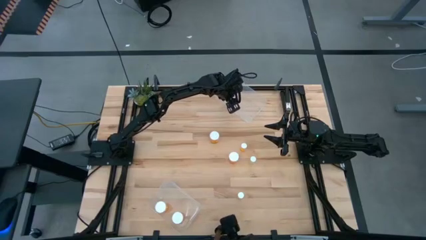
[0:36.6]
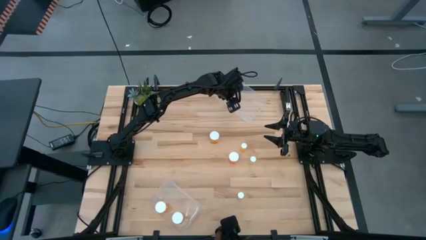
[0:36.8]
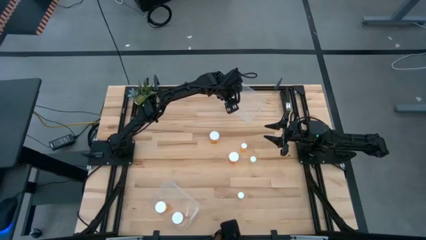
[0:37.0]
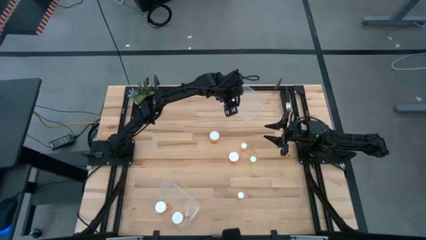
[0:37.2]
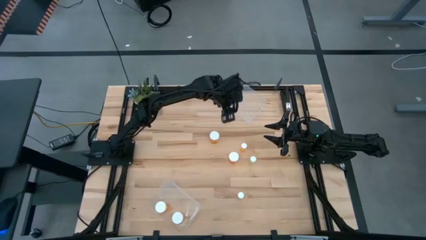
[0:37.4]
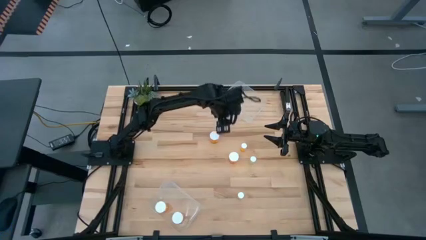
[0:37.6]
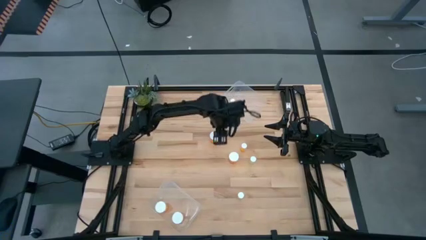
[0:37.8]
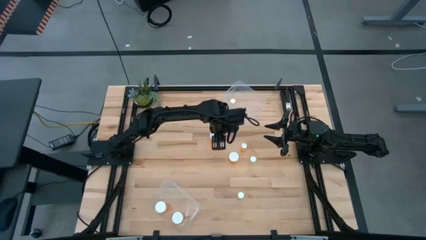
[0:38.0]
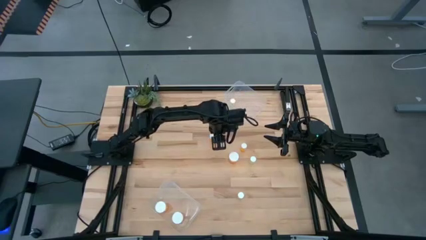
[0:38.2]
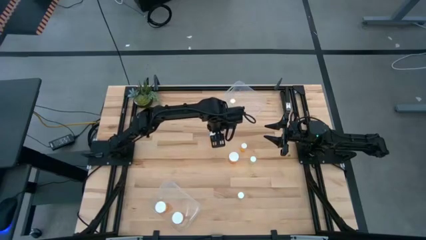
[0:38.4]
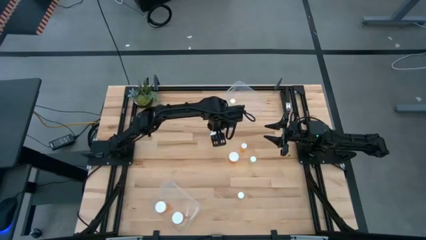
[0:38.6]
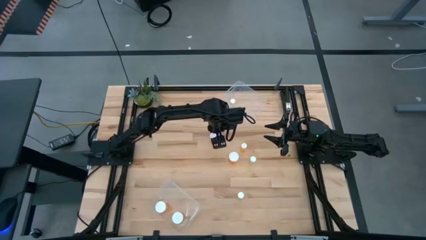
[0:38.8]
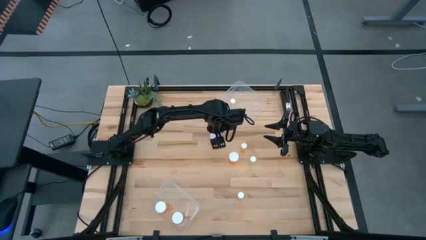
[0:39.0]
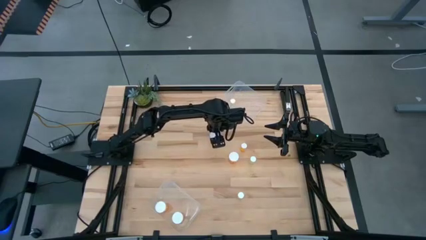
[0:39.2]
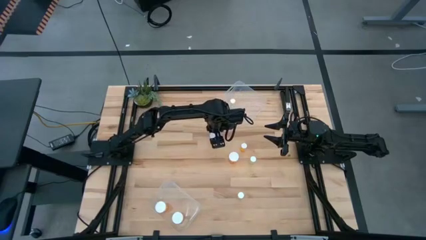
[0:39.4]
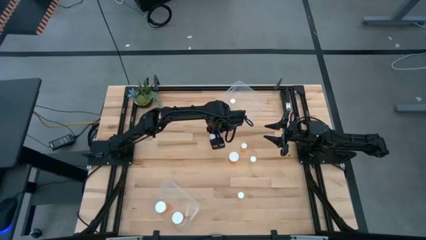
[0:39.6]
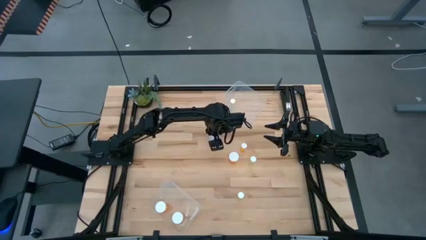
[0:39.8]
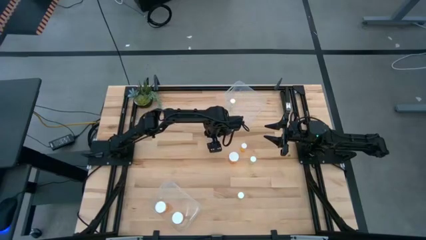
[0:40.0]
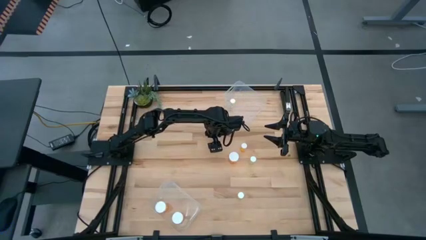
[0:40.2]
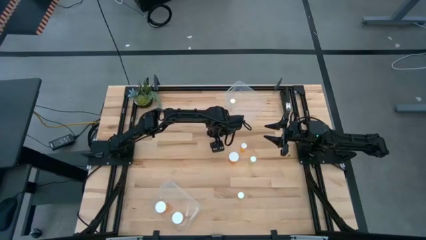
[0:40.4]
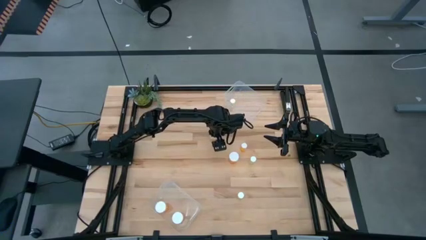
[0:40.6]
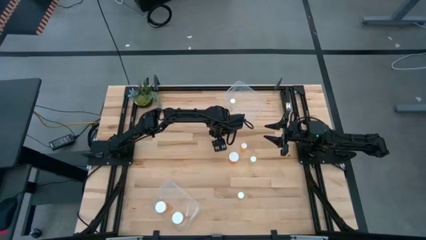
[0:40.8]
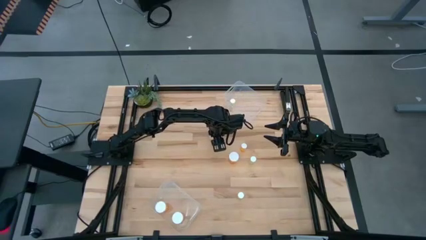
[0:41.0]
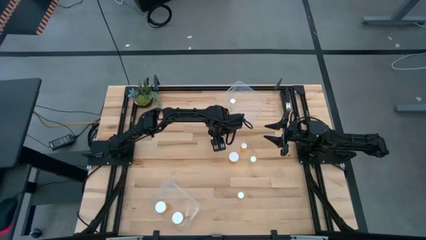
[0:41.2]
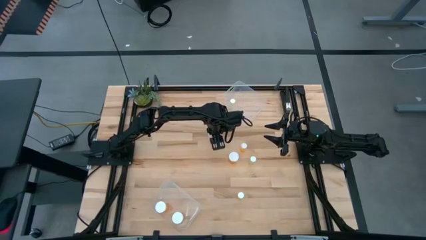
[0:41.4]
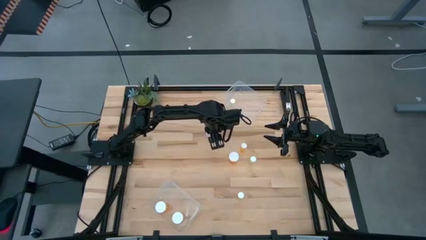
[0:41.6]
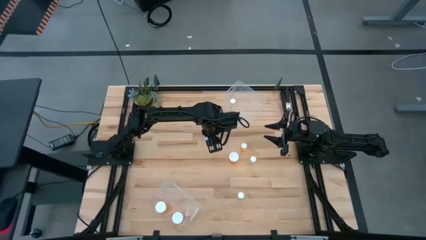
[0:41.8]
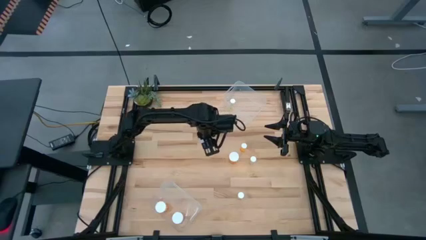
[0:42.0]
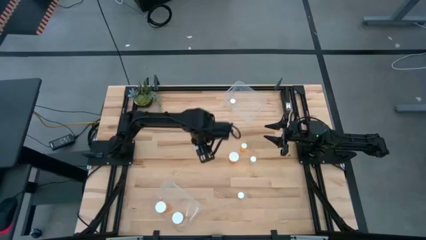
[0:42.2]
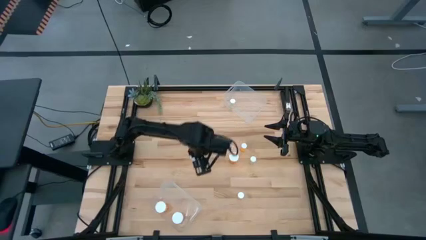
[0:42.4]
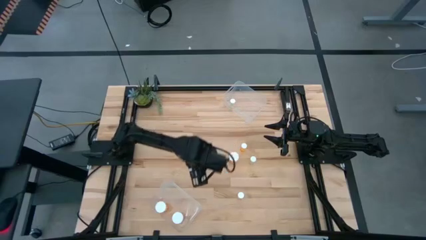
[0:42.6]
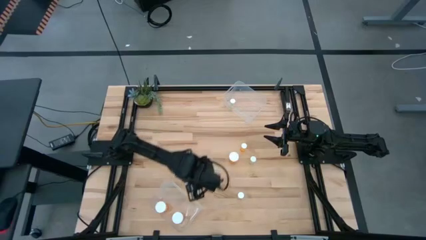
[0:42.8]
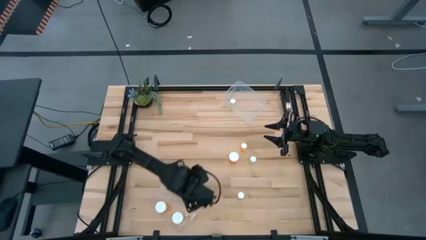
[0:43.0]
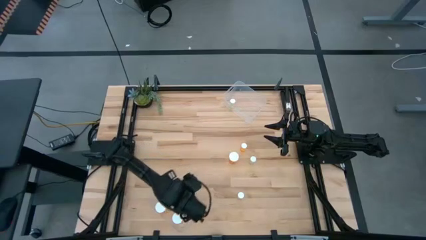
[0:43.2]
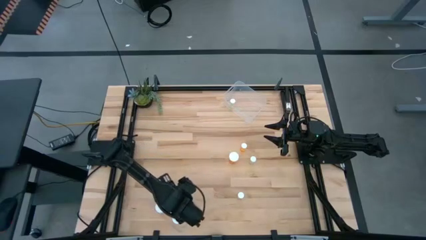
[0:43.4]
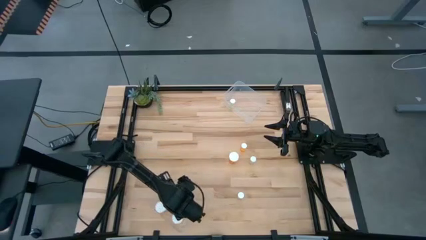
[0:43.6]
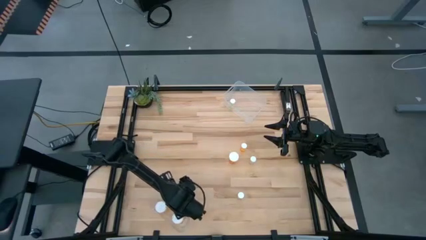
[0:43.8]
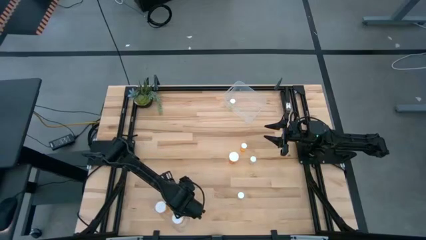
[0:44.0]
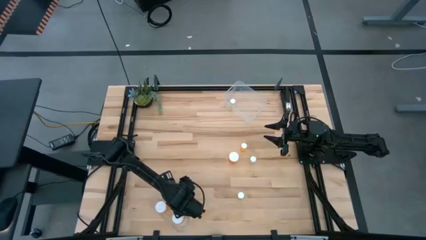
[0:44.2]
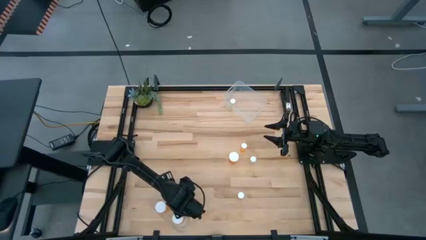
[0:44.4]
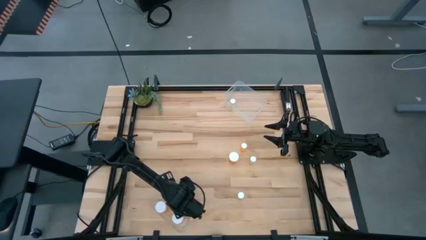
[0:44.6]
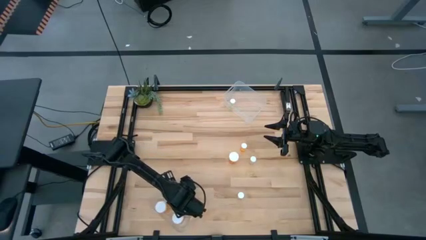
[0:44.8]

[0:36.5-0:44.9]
Task: Pick and place medicine bottles into bin by pill shape (circle, oval)
Put the orange capsule bottle into the bottom transparent bin

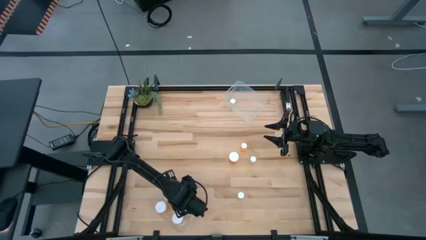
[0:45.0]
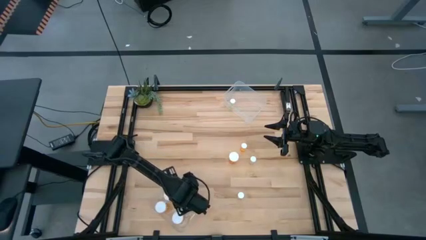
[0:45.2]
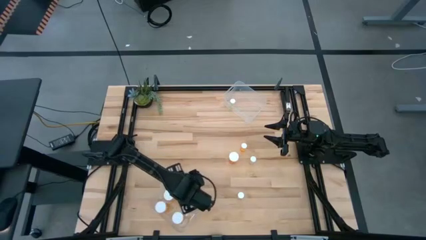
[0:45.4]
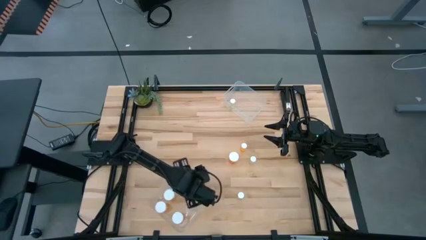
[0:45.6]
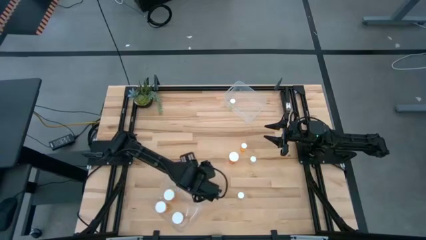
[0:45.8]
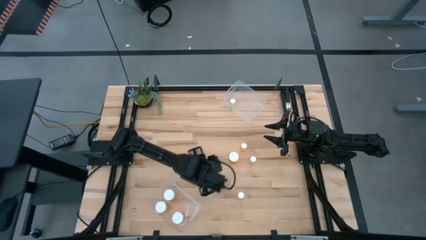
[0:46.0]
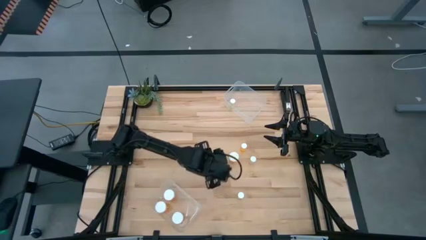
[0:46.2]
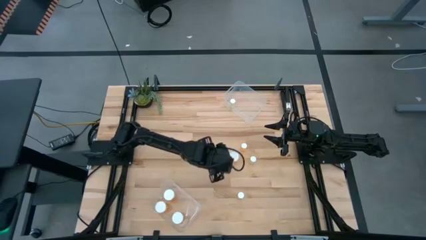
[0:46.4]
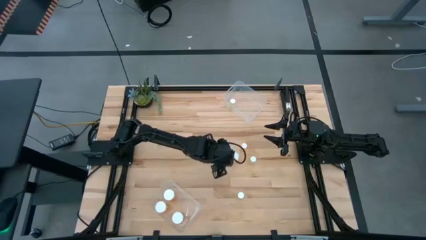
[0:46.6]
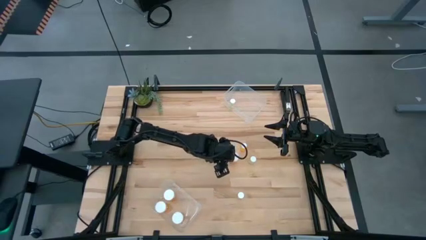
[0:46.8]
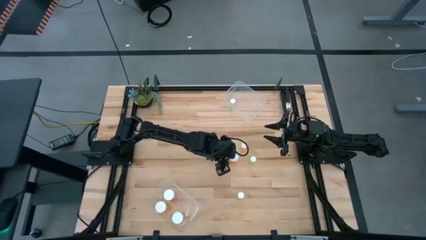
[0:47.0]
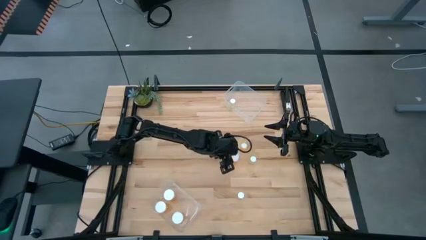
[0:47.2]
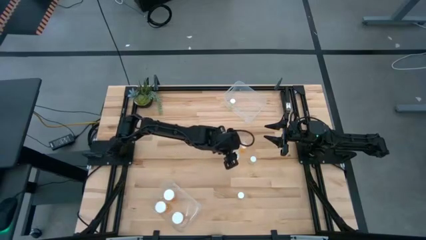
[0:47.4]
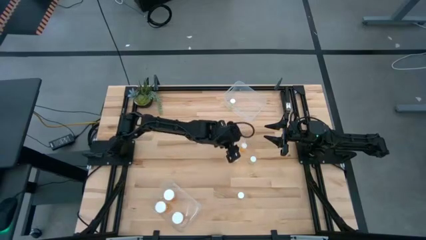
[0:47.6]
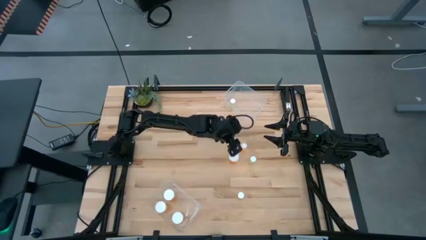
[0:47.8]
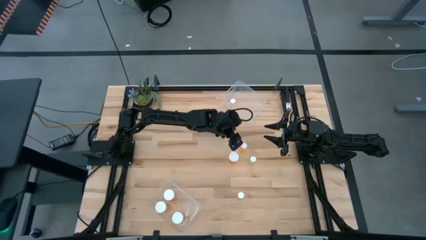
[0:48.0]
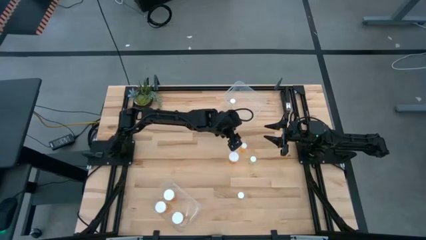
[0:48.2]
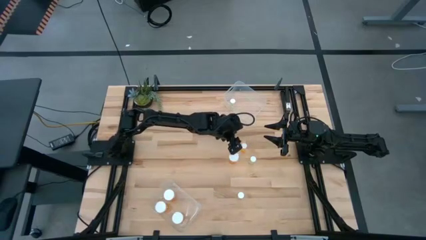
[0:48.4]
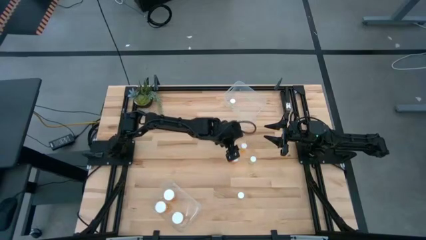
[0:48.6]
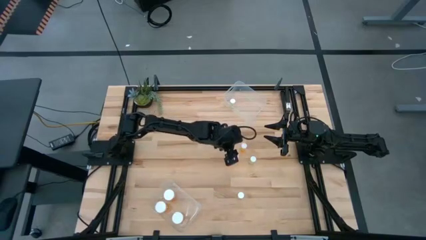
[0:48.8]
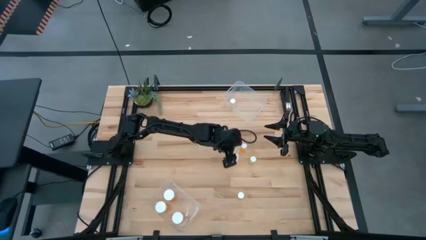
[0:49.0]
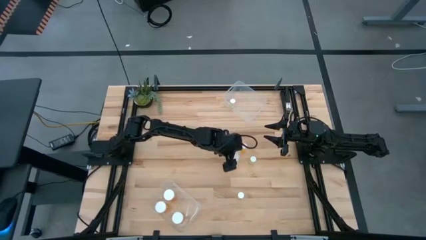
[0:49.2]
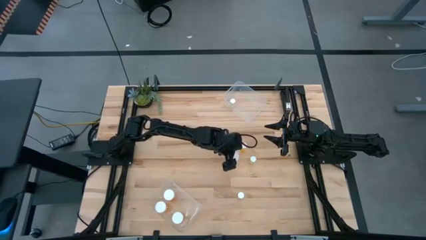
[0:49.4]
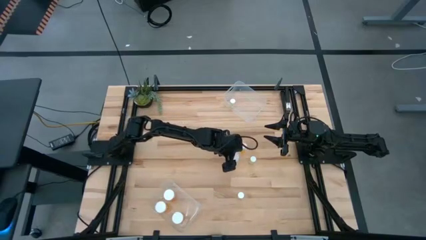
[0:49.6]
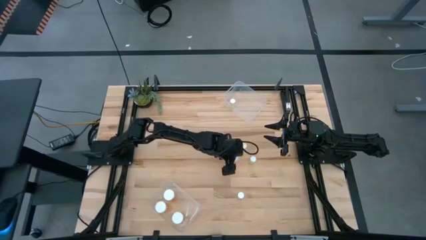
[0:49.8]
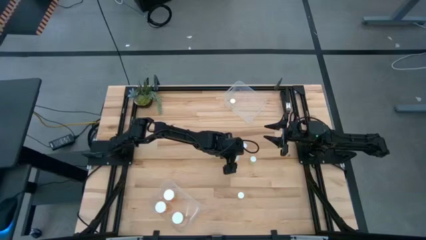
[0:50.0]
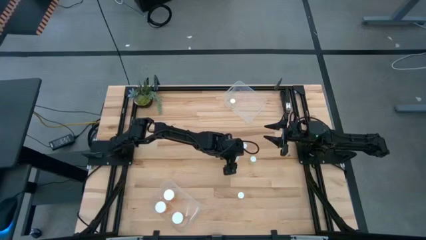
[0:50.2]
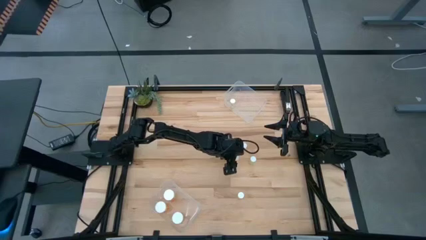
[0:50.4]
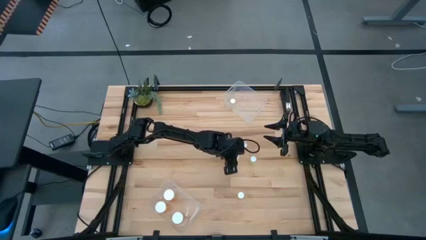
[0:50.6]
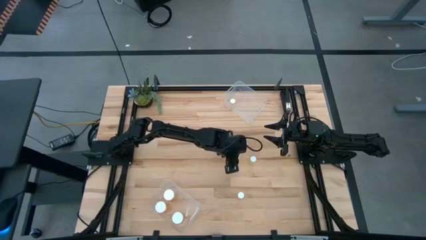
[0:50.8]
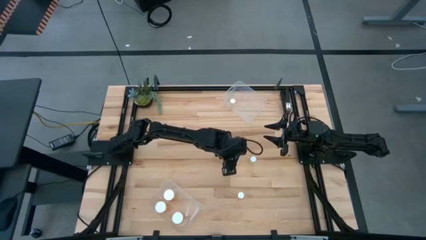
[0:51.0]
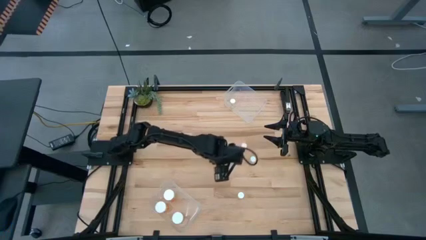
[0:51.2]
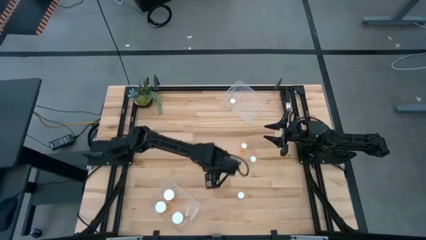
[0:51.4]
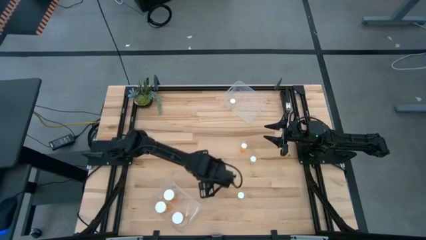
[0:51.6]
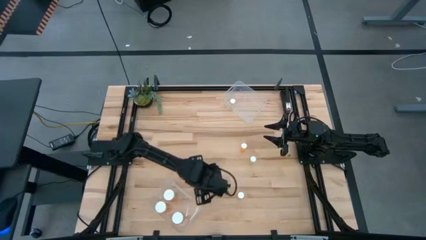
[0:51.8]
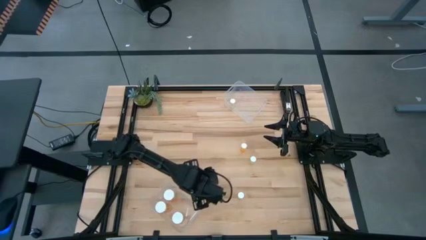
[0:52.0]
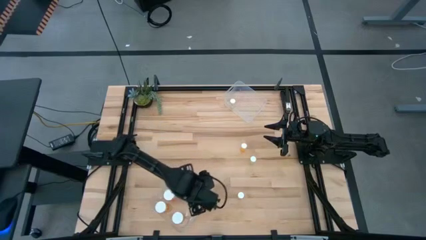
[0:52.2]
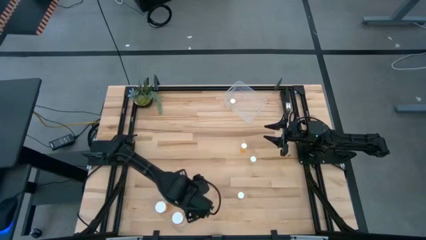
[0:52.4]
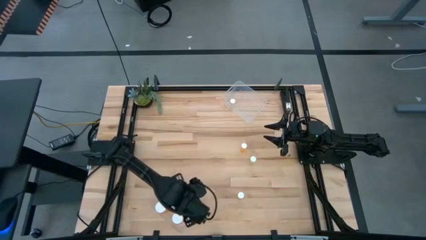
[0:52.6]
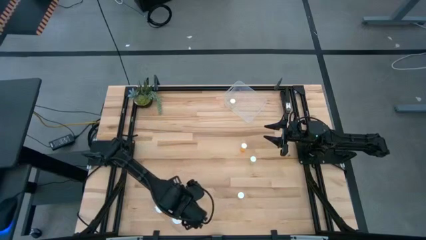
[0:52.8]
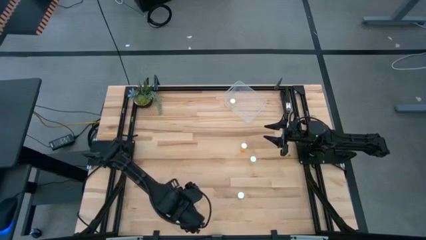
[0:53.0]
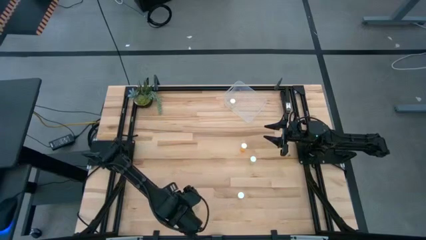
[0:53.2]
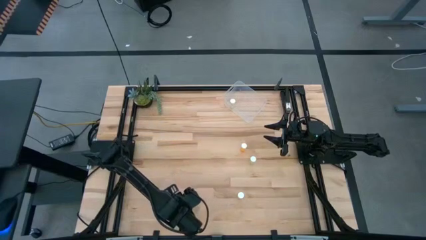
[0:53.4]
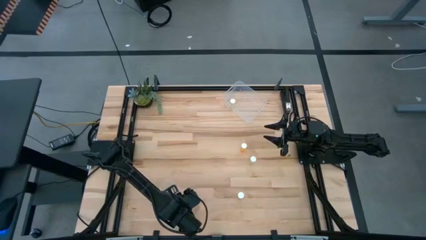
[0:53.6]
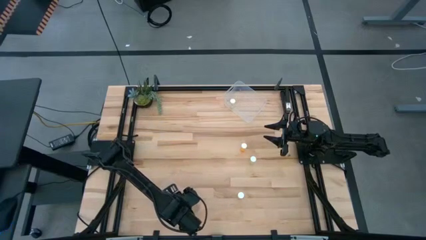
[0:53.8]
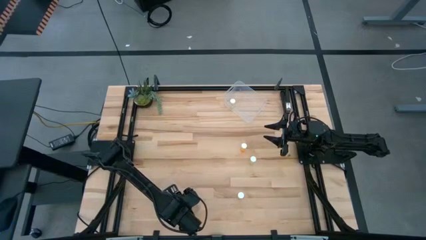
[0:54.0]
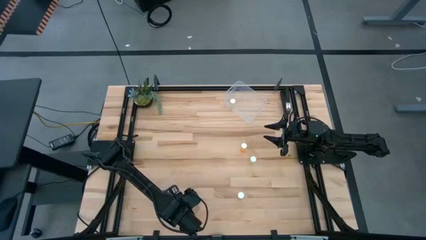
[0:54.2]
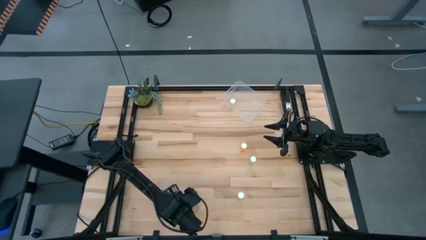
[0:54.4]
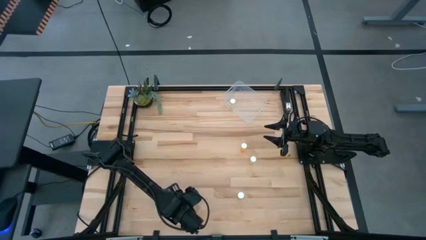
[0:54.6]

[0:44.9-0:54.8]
Put the orange capsule bottle into the bottom transparent bin
